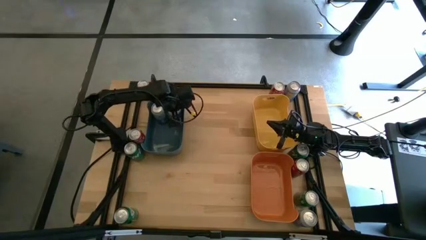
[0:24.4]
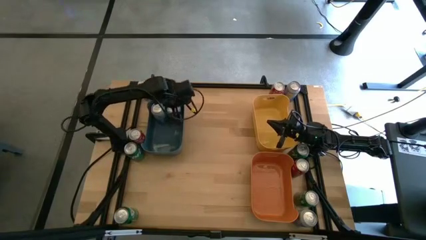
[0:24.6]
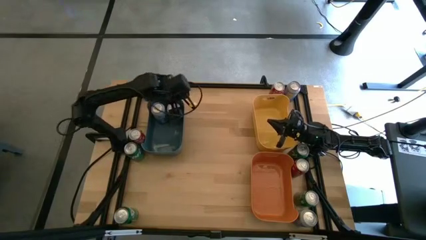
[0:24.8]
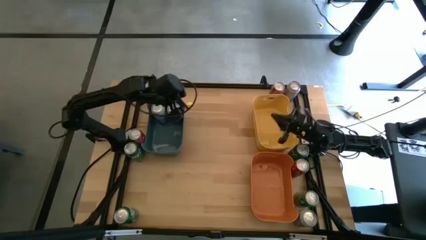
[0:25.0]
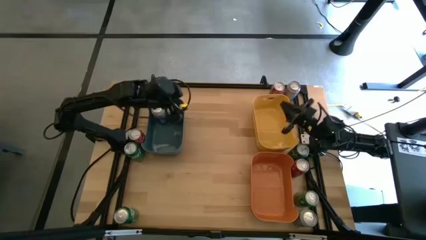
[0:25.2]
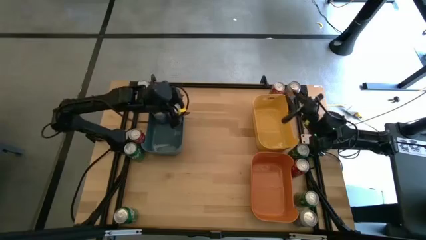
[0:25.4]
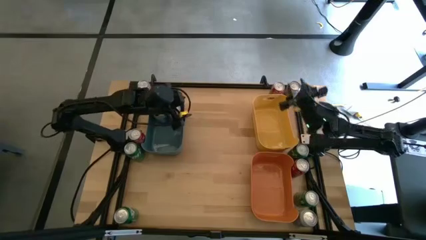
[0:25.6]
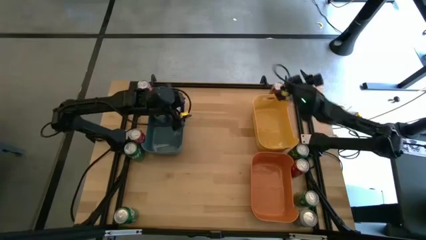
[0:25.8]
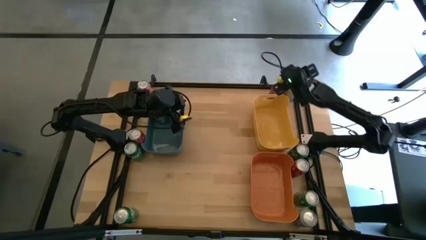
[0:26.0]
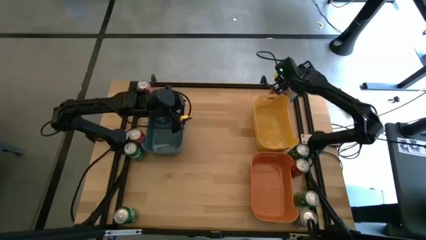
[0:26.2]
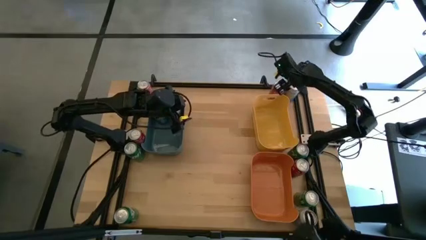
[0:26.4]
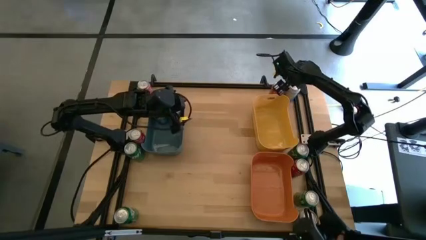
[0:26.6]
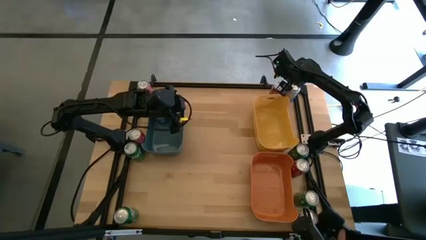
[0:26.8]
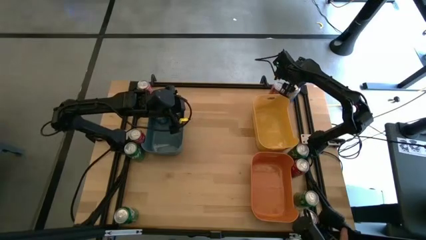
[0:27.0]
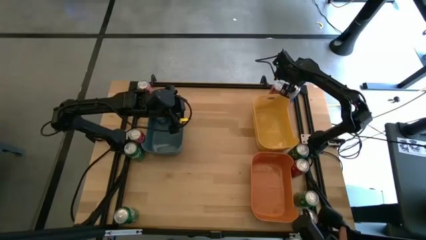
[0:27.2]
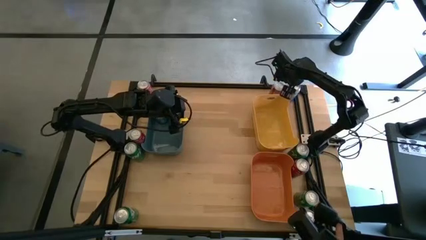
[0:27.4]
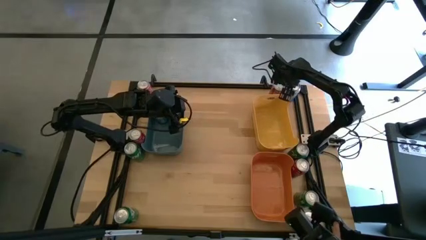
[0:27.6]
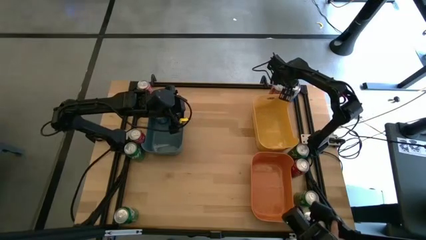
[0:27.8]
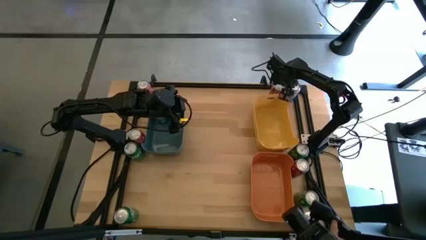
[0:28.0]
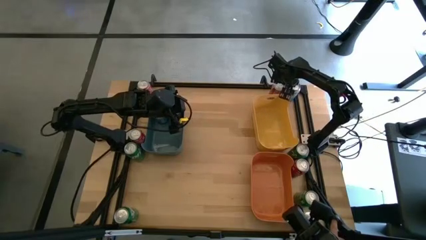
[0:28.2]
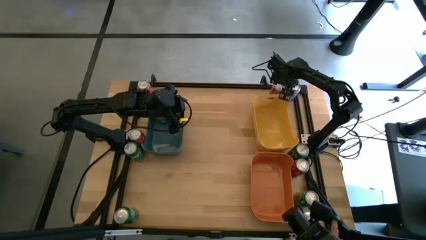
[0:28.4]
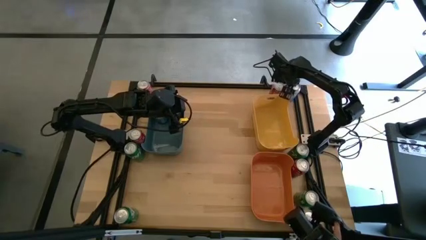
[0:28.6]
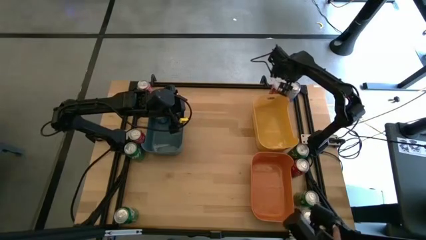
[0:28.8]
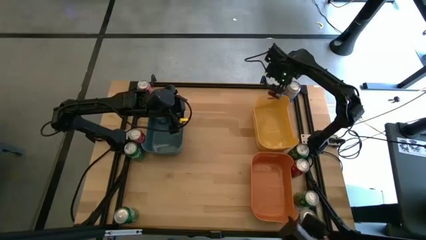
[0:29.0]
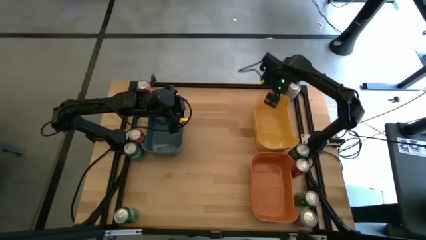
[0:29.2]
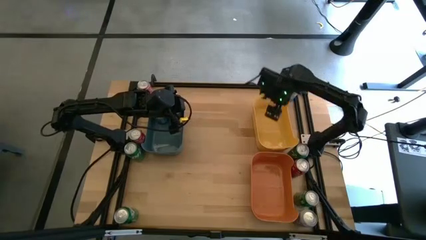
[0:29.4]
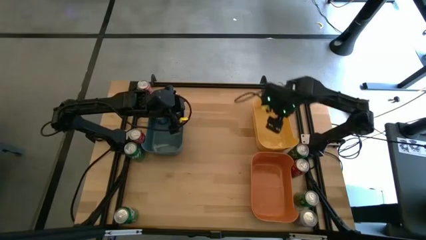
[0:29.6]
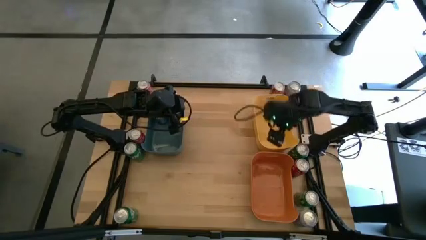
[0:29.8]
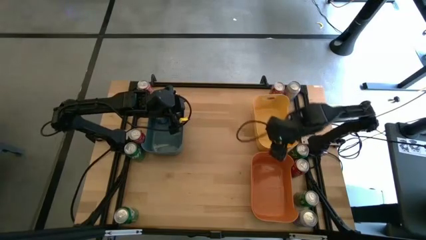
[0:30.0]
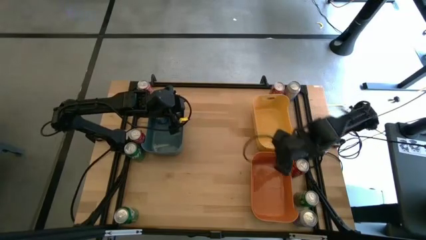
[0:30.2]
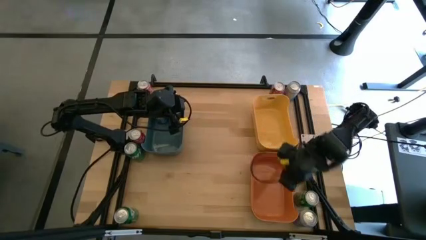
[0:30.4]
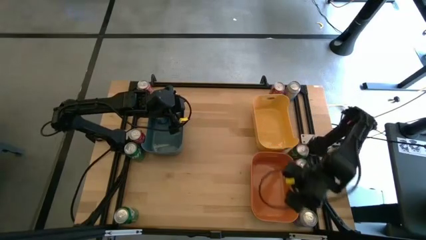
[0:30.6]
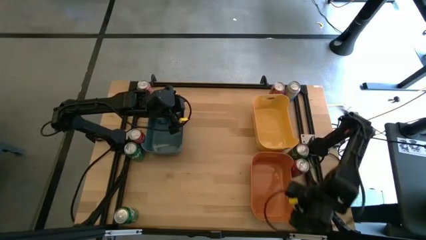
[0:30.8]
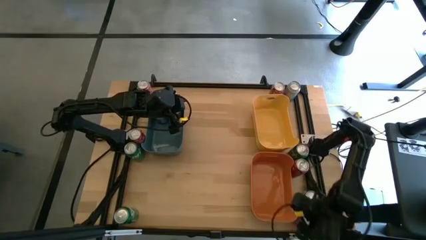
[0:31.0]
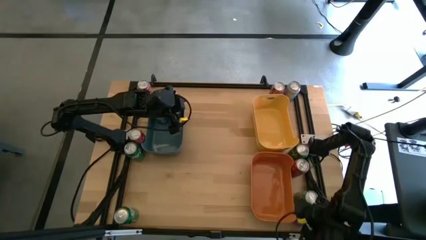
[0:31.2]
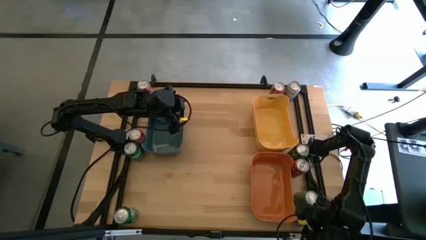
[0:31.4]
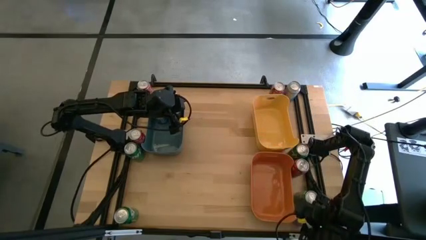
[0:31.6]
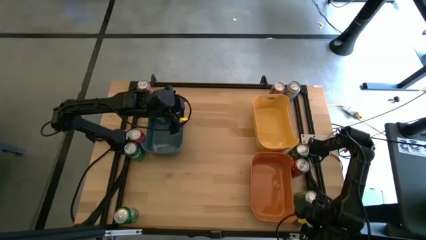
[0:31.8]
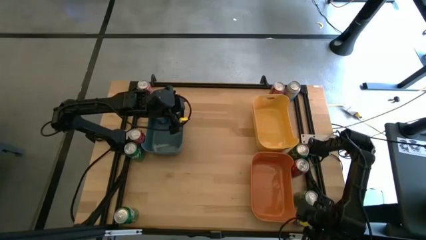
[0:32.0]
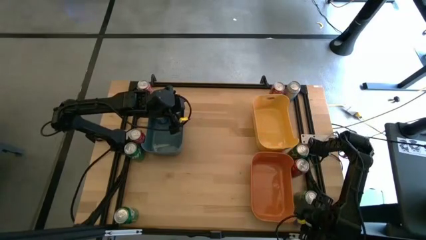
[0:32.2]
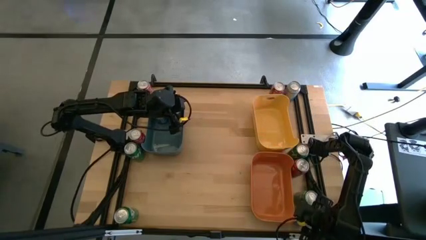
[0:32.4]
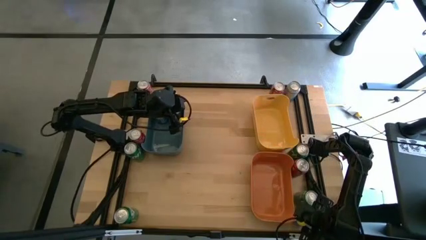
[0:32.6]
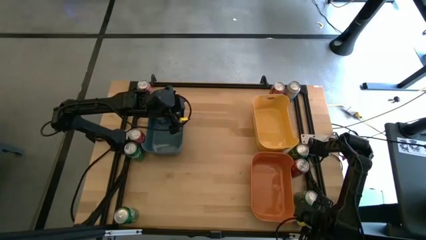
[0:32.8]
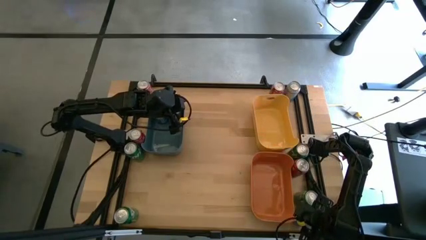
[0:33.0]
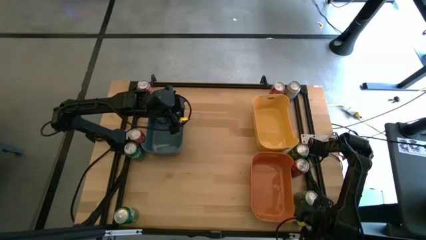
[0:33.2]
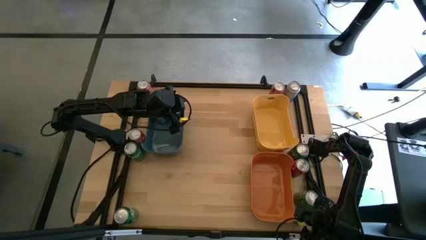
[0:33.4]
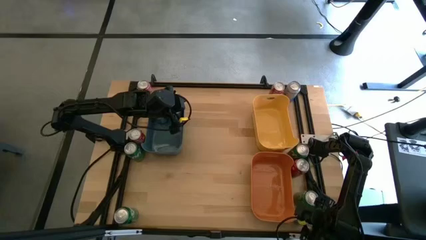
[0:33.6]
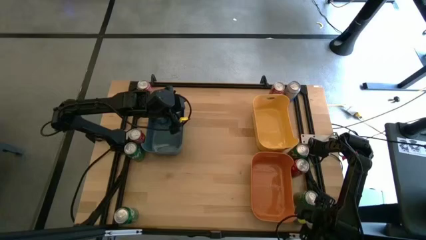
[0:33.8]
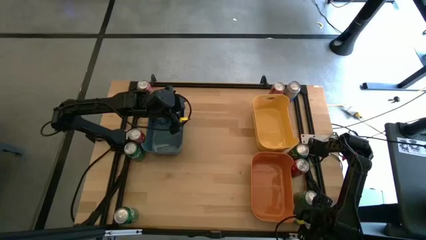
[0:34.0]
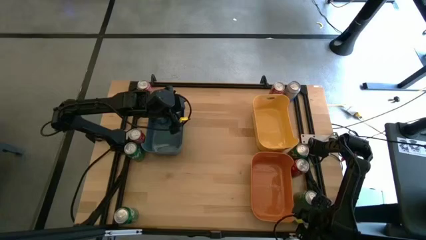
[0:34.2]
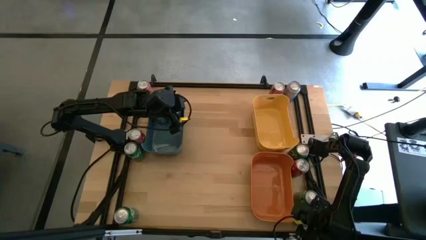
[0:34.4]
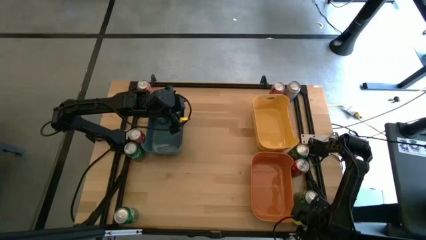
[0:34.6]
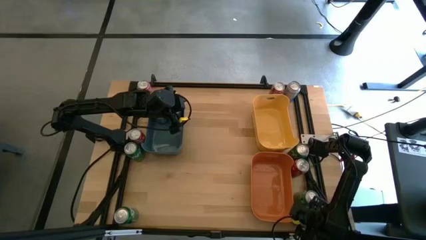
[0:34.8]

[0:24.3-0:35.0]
Task: Sort soda cans
Put the bottom blue-white soda can into the blue bin

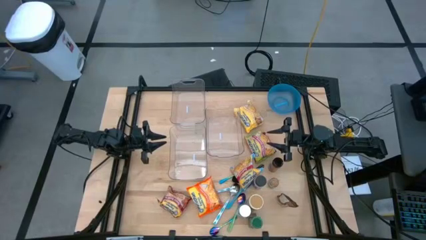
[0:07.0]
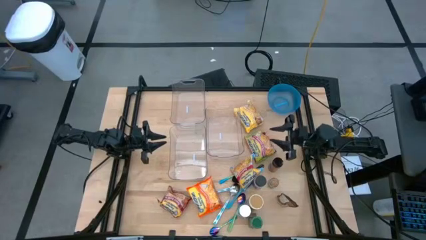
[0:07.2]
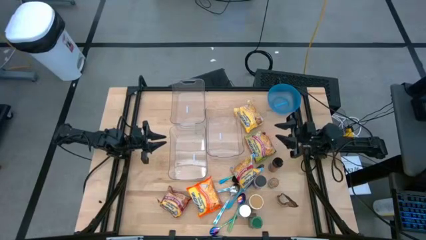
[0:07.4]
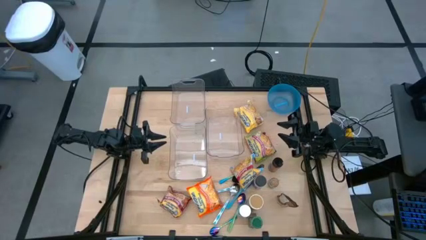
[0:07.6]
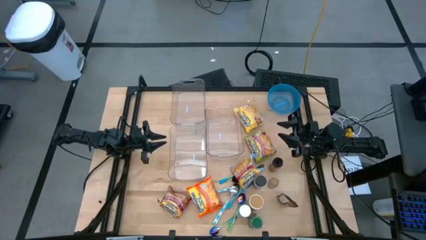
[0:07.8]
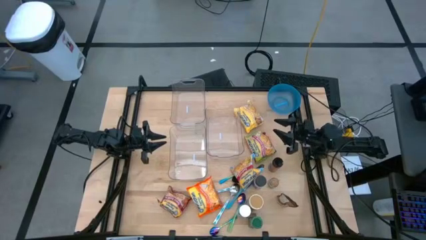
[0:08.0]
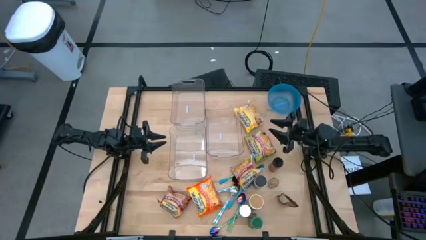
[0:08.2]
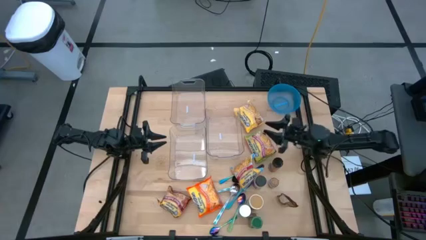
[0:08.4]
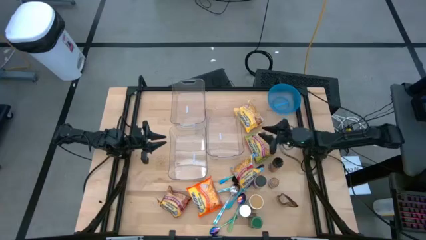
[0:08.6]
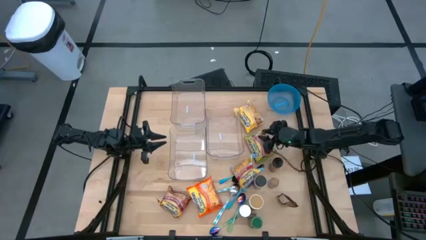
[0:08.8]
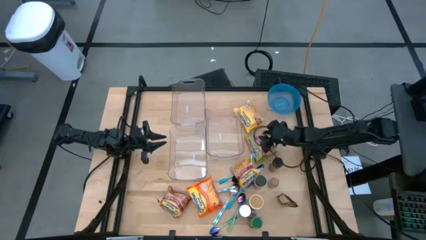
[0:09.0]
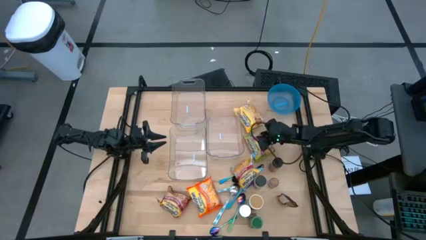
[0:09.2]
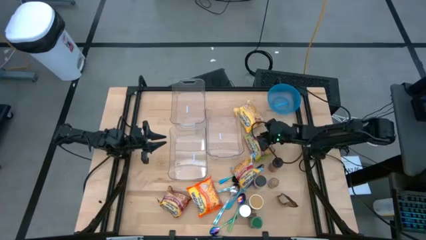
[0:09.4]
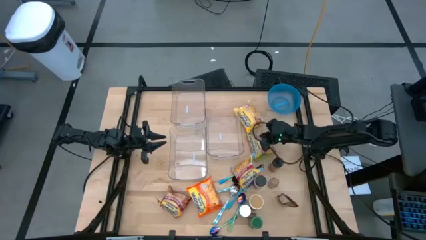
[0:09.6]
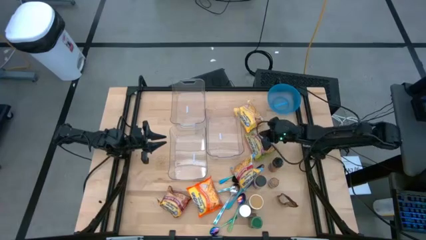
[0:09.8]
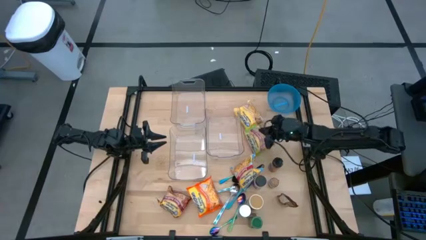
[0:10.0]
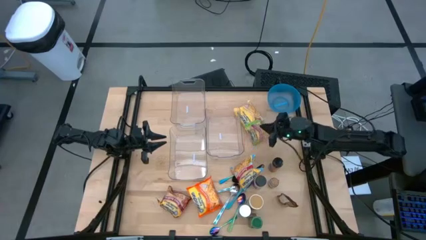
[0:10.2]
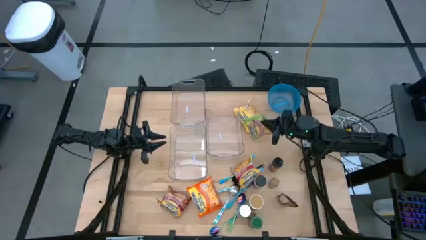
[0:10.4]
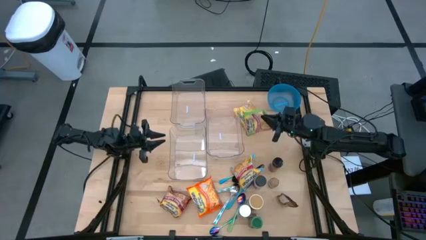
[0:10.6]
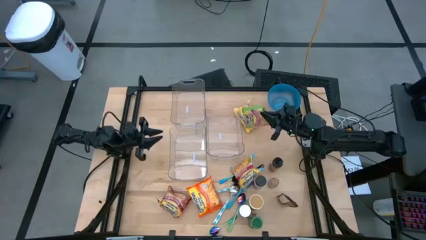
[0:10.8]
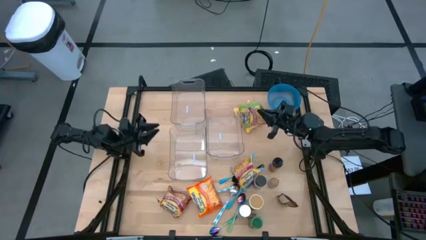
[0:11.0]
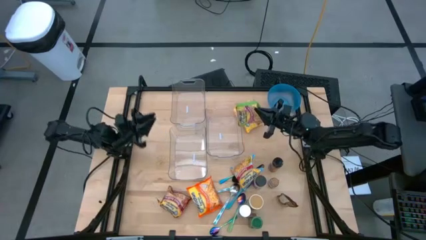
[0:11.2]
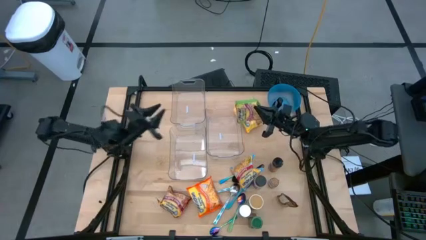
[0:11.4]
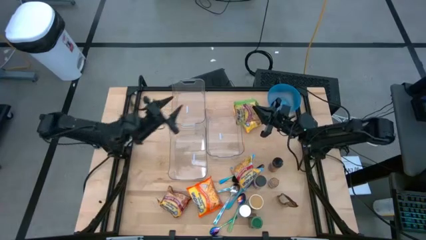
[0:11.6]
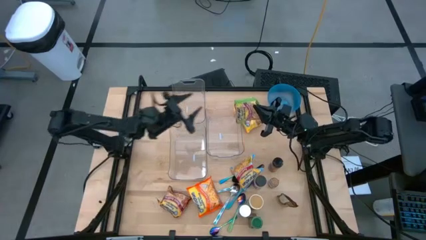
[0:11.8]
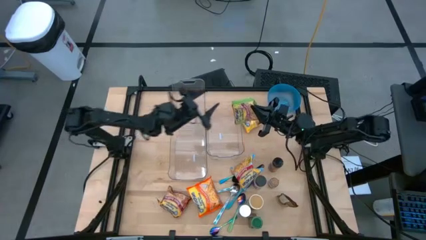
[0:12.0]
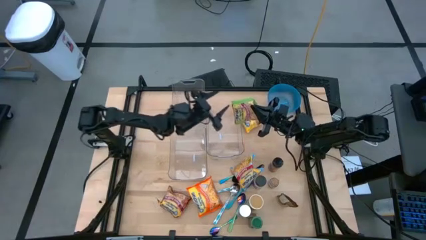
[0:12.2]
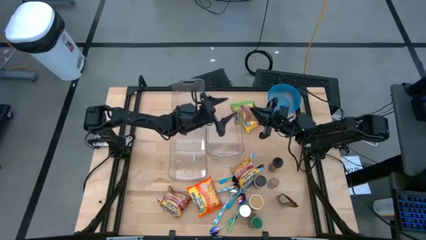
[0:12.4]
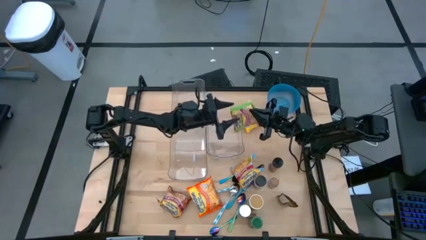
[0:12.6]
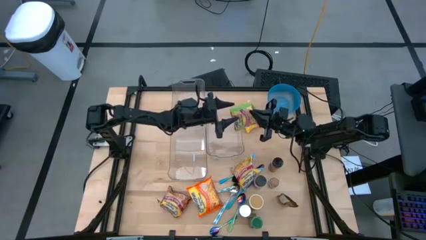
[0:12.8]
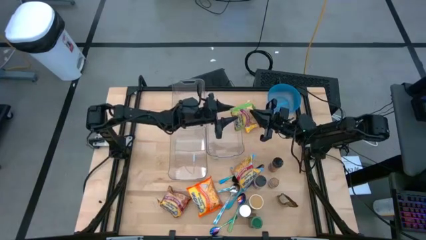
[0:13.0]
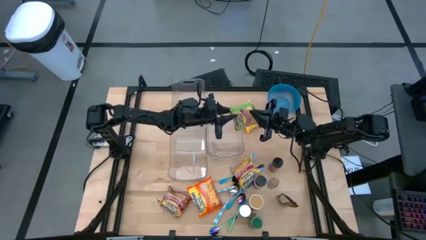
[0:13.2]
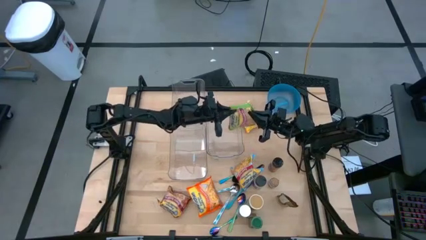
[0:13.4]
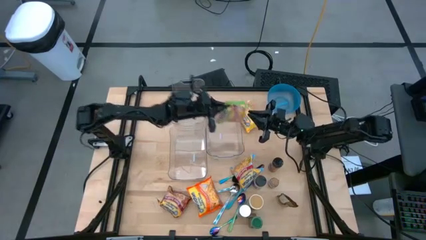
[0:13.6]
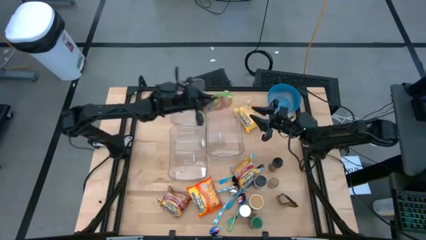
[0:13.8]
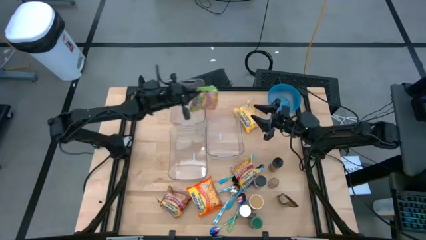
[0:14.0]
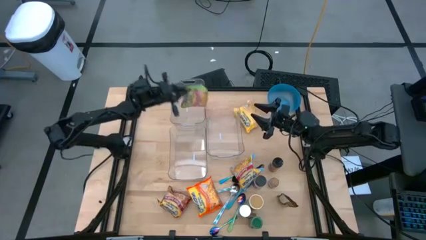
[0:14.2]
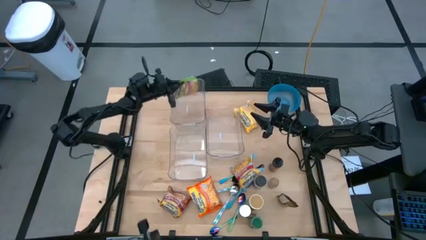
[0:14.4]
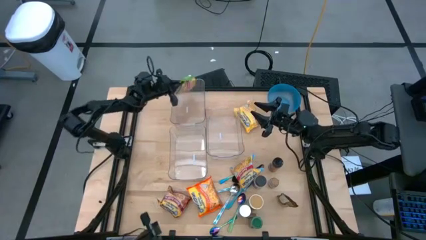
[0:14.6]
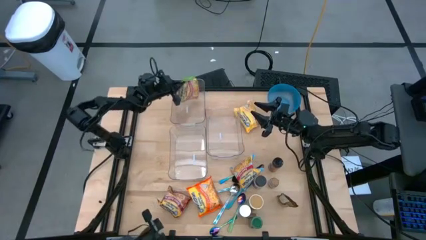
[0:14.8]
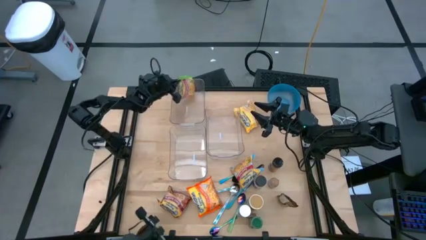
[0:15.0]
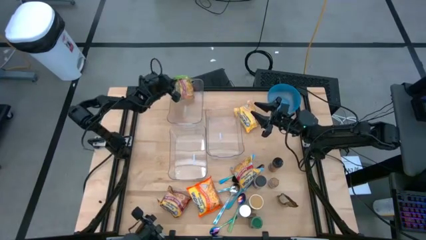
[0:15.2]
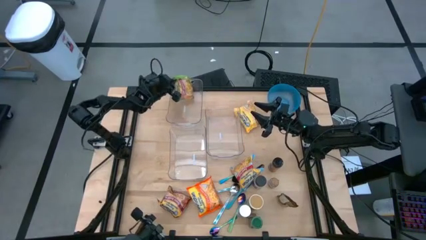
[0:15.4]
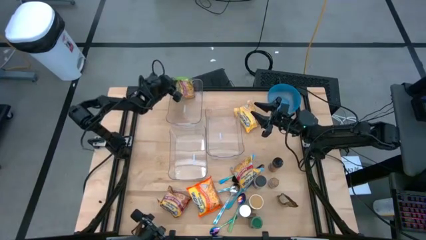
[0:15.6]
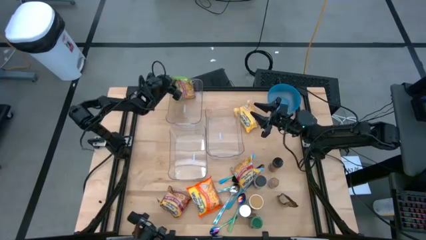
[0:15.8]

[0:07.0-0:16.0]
Task: Pick & Place Food Item
Put the green noodle pack into the top transparent bin
